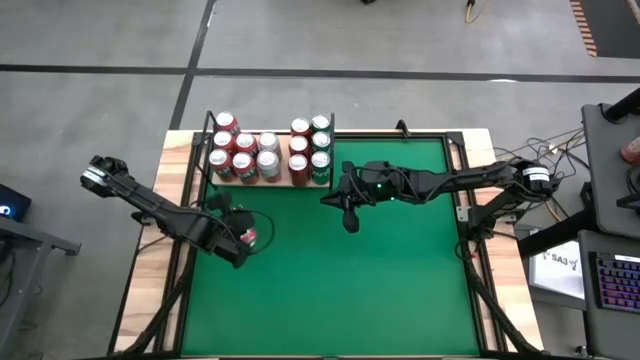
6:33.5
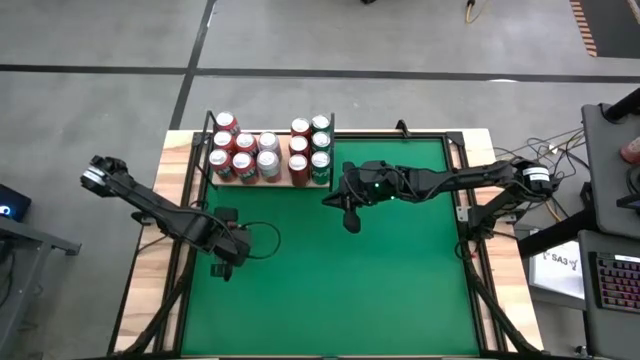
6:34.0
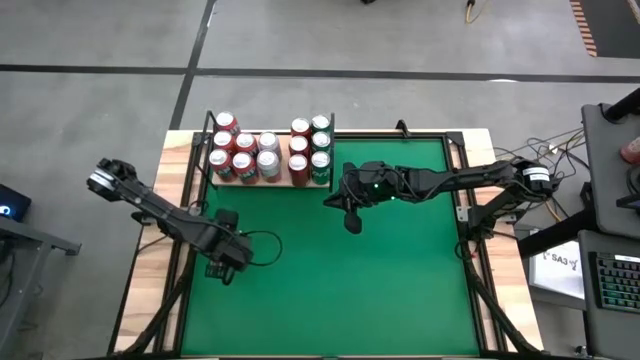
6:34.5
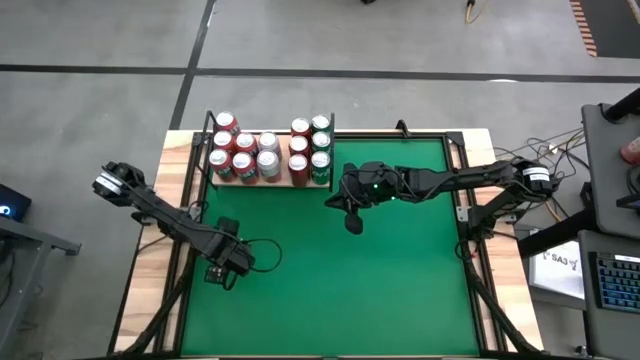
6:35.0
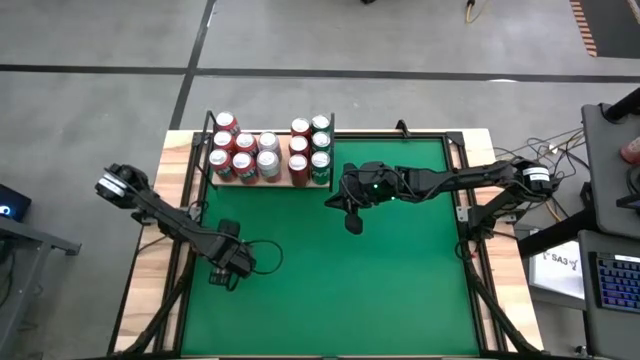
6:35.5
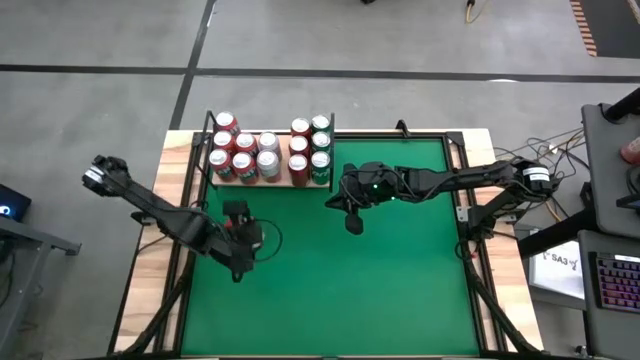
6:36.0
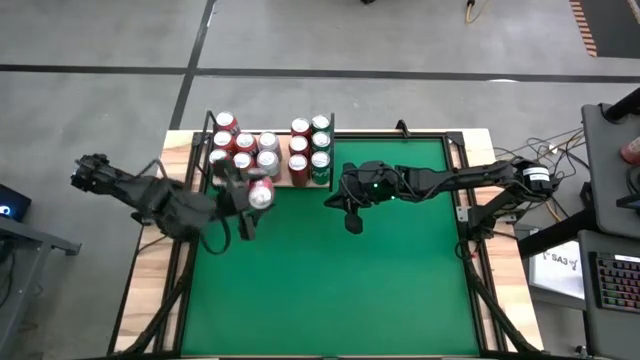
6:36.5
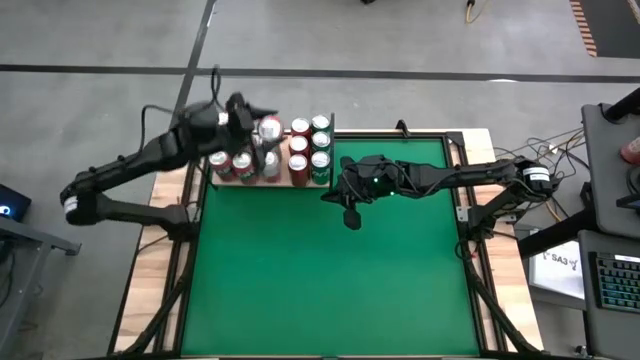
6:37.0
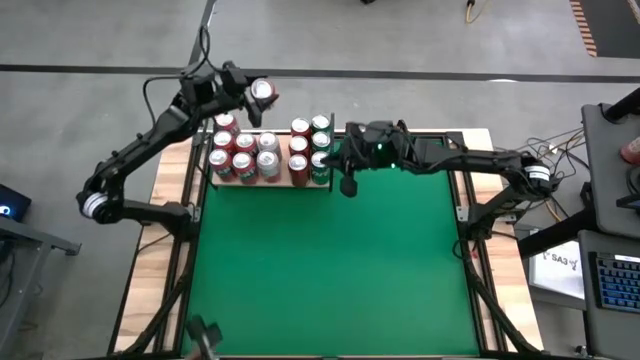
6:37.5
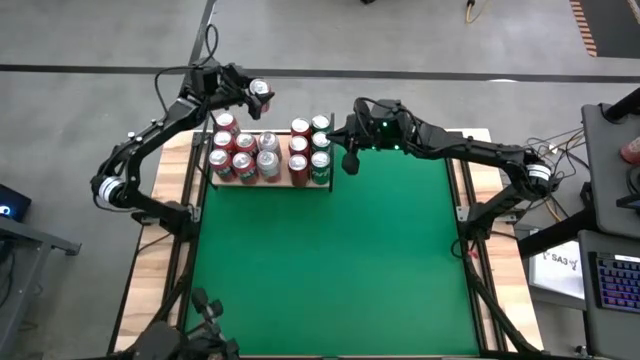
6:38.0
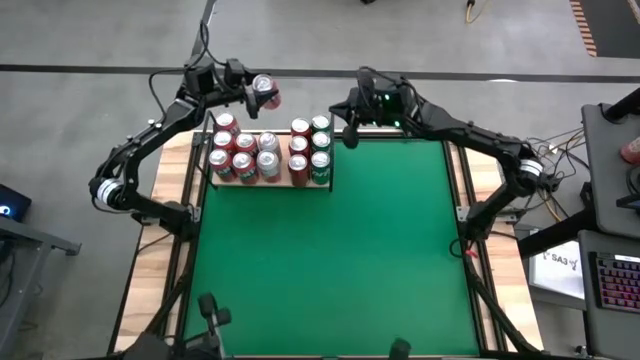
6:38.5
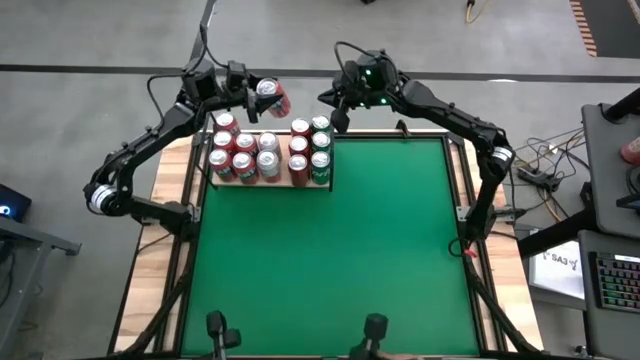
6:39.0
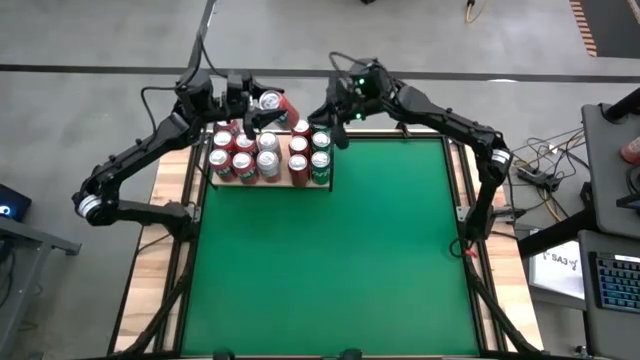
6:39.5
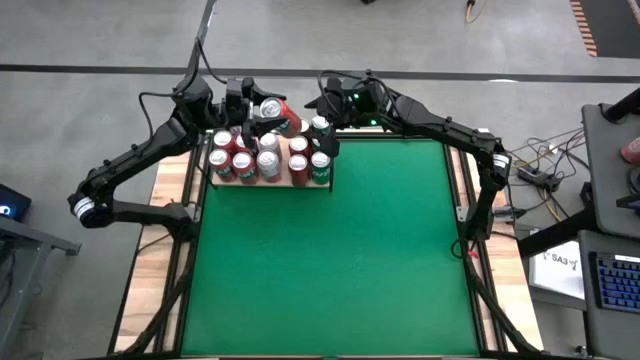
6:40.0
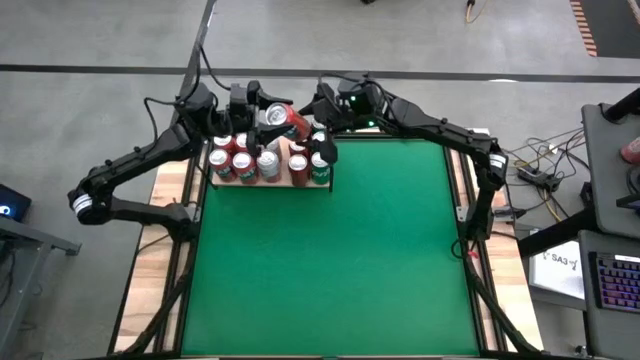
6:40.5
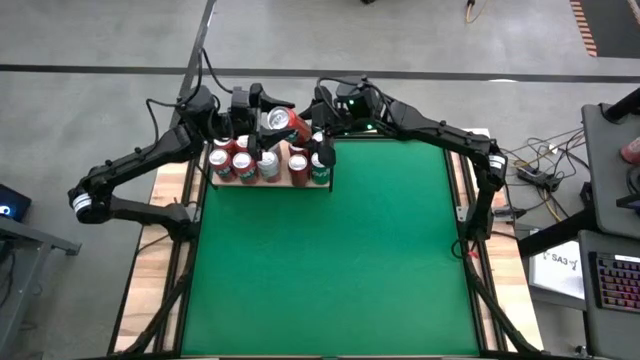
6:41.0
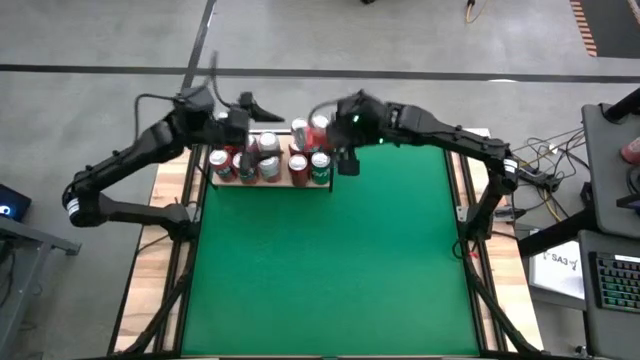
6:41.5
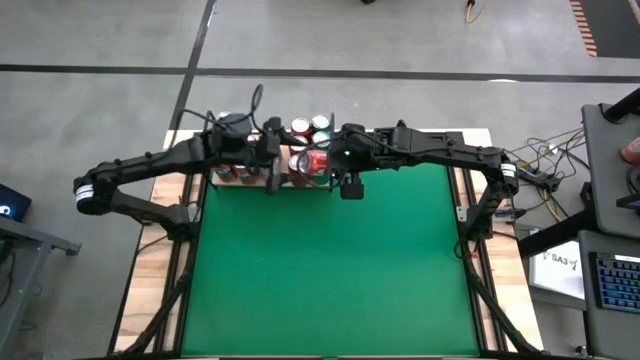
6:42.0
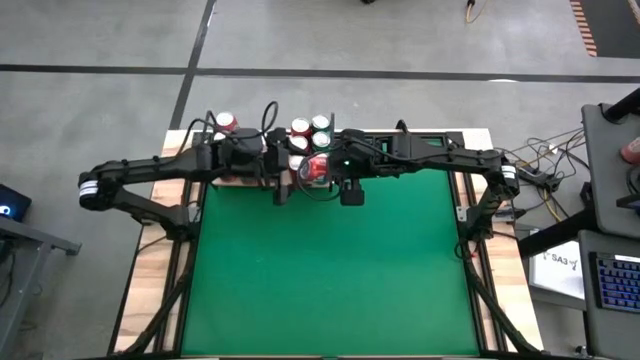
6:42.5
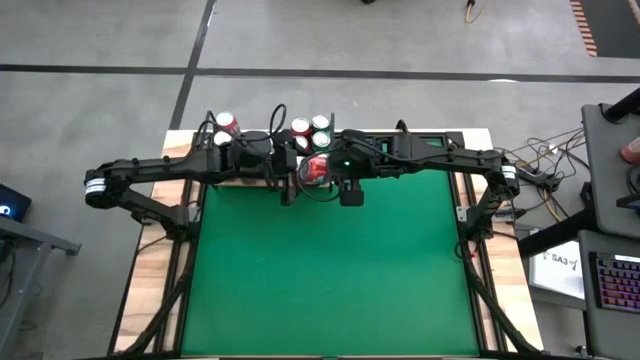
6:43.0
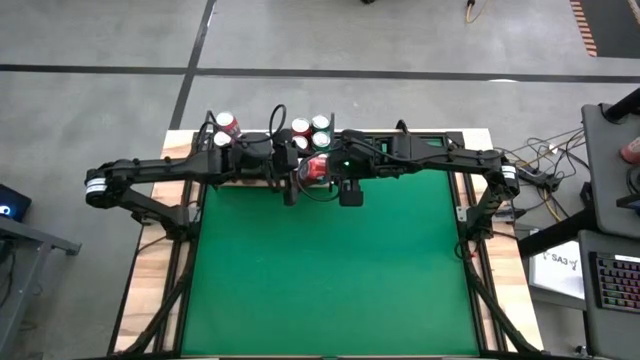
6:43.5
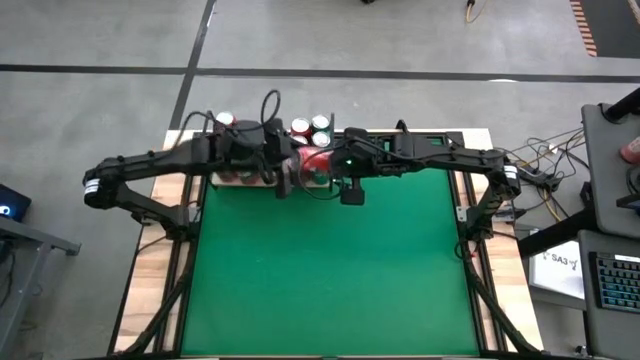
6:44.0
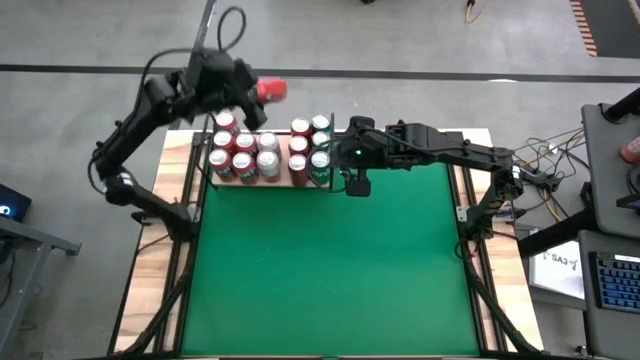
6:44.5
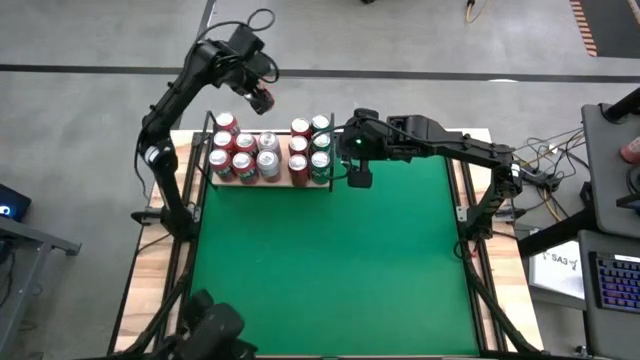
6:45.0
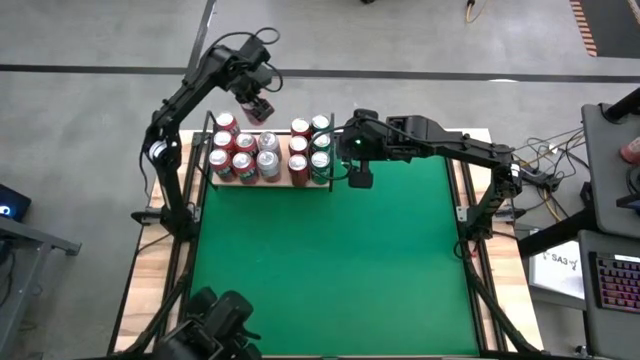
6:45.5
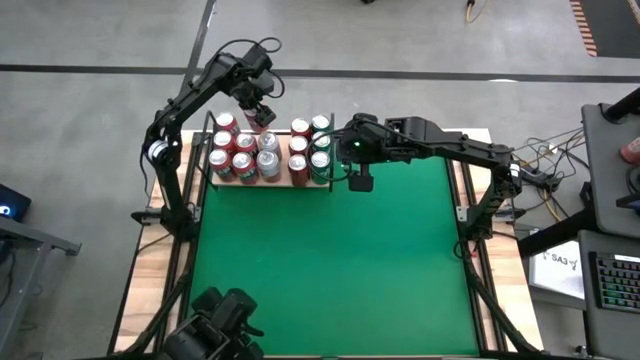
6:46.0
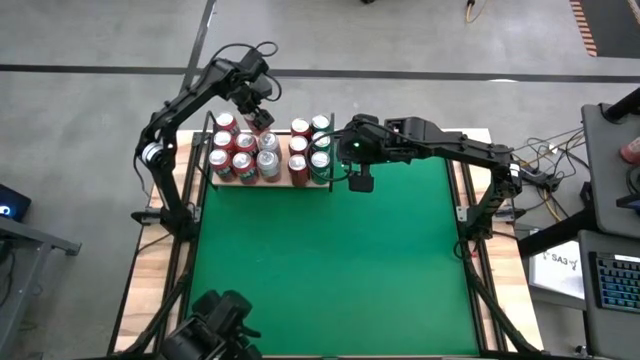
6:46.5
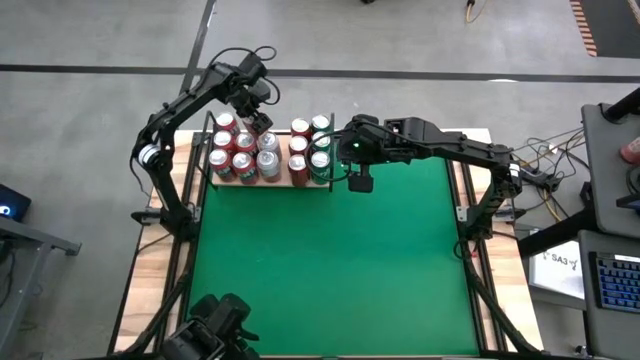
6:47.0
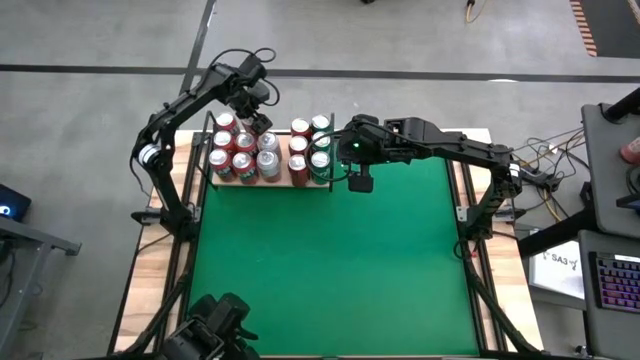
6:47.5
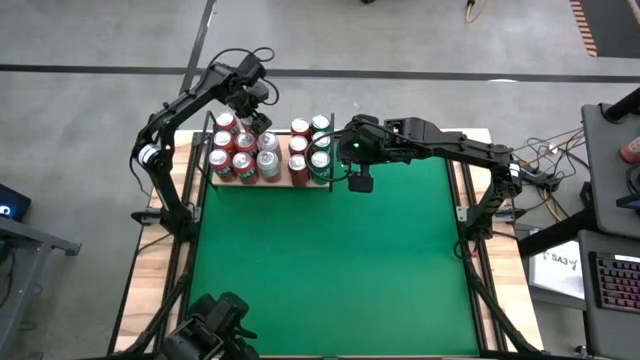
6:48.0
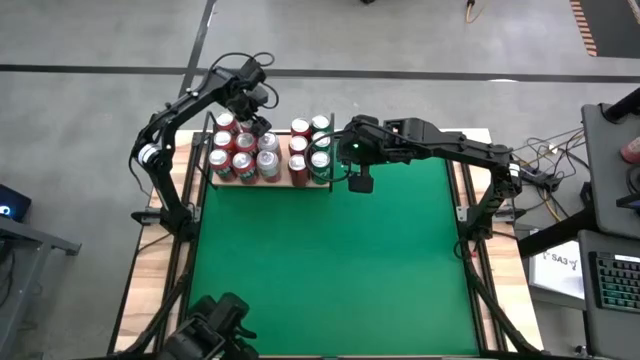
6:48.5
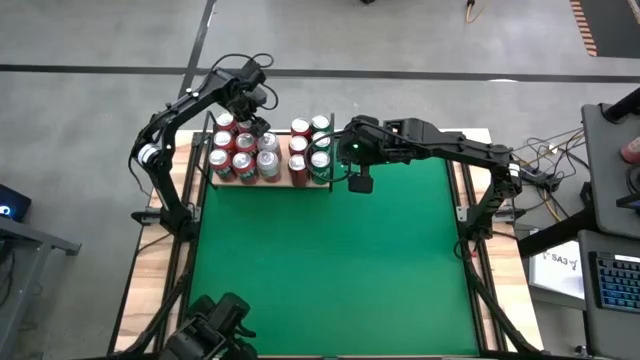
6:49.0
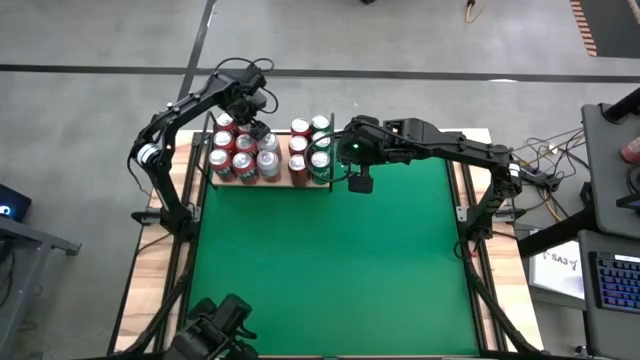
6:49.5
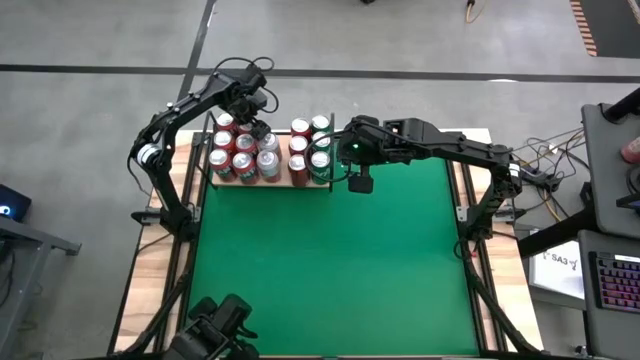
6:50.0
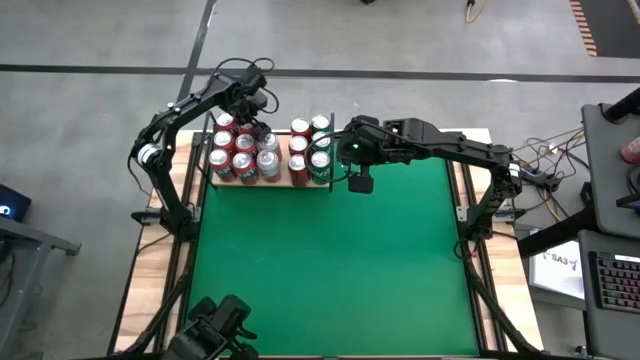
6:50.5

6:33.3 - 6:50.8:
Task: Place canned beverage on shelf
Put the red soda can on the shelf aligned with the other red soda can

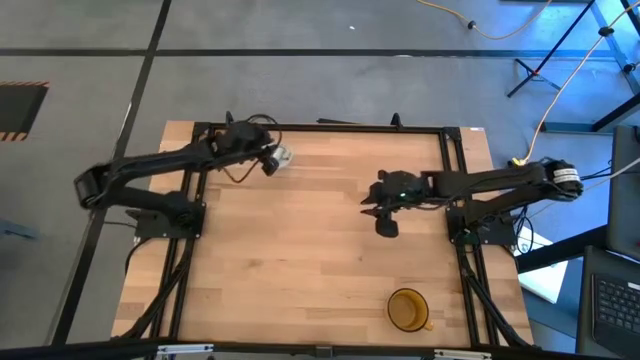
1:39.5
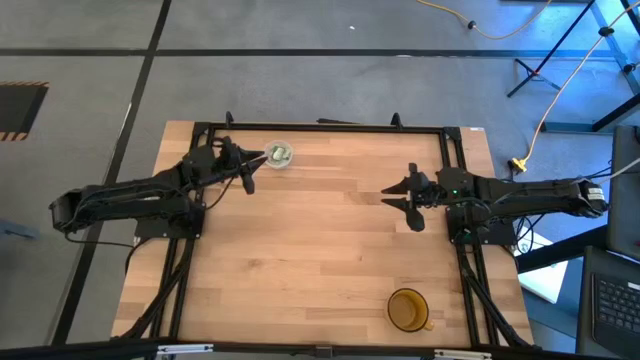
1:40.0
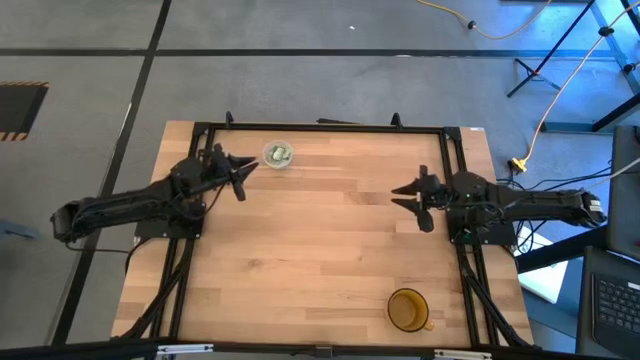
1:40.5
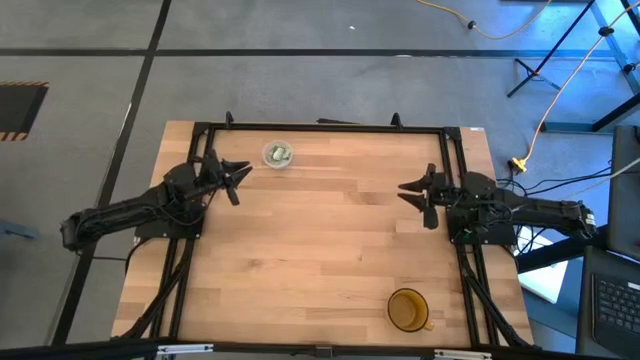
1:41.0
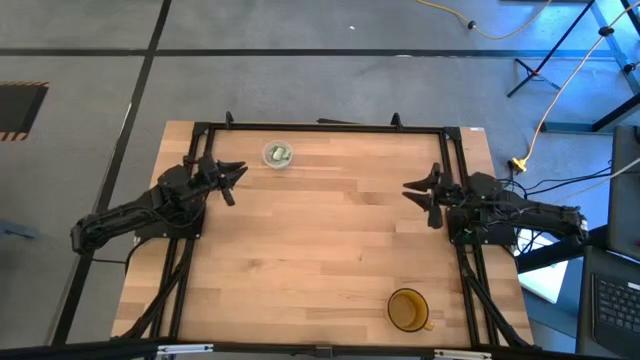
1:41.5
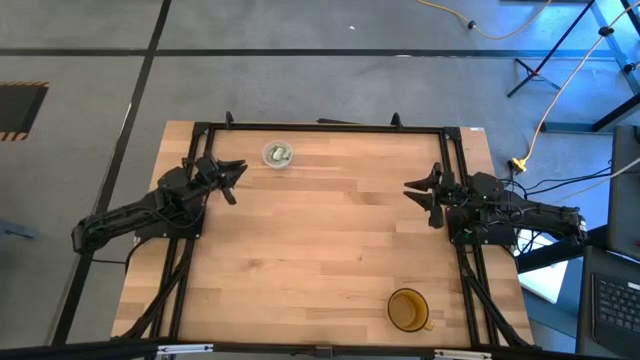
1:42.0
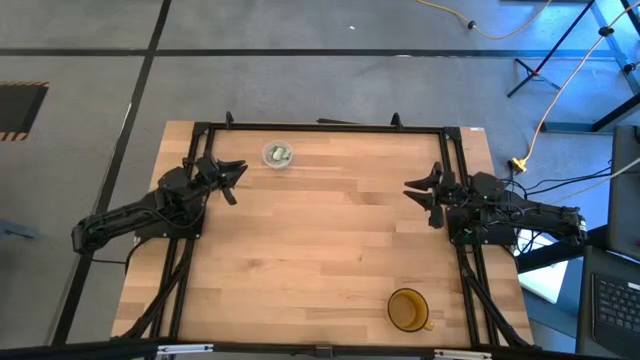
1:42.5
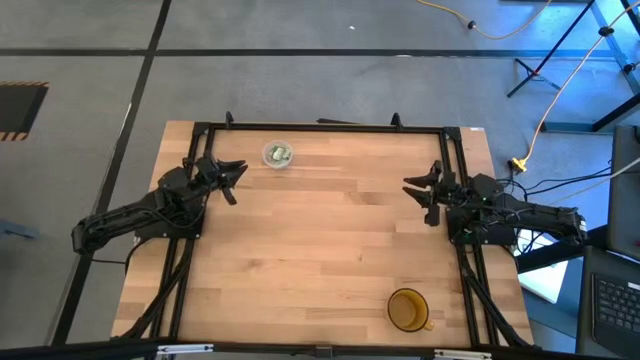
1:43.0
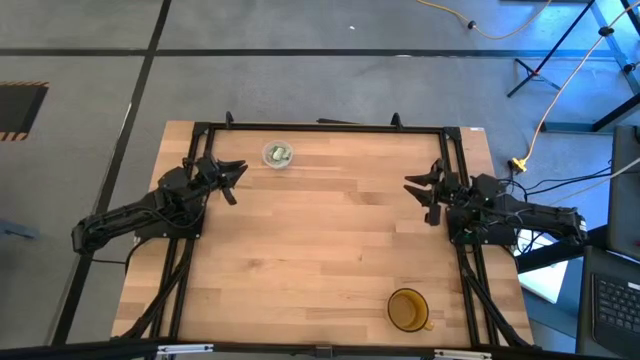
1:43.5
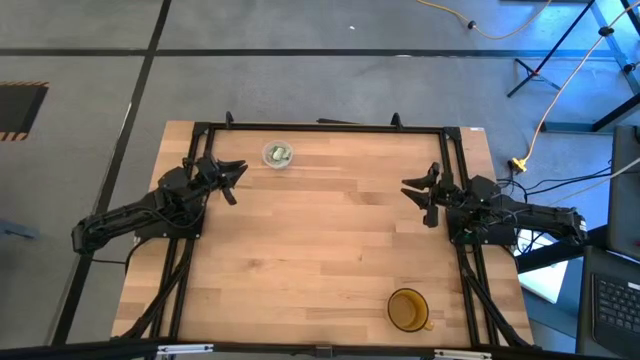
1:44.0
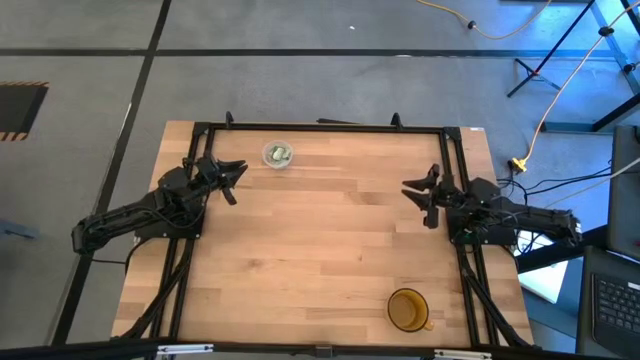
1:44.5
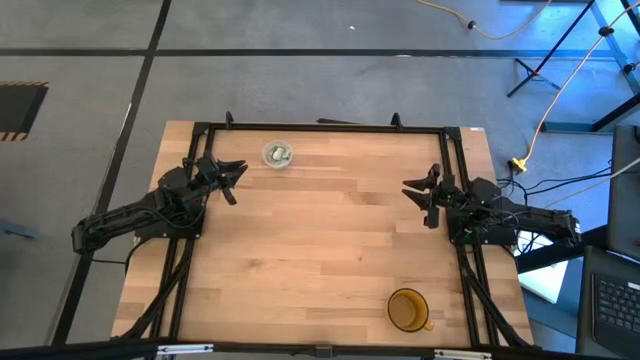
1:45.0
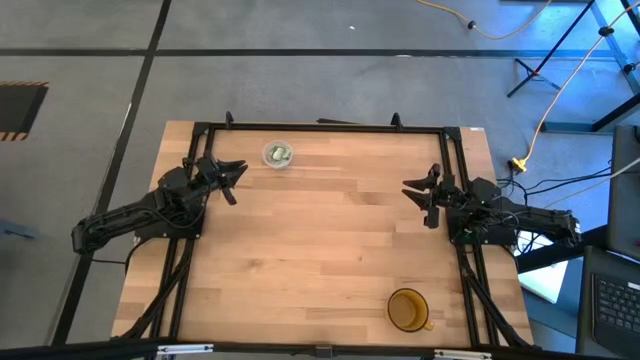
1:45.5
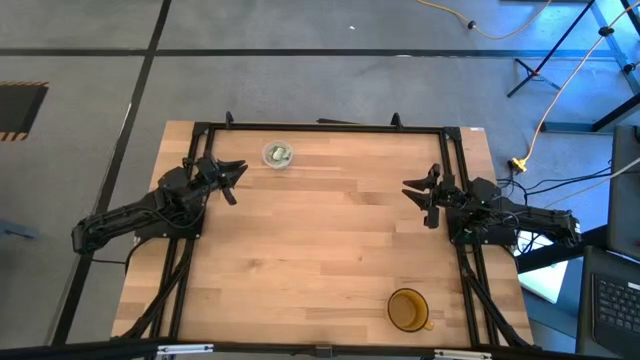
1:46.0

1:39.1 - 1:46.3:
Task: Pick and place Stevia / Truvia into bins
Return to Home Position
